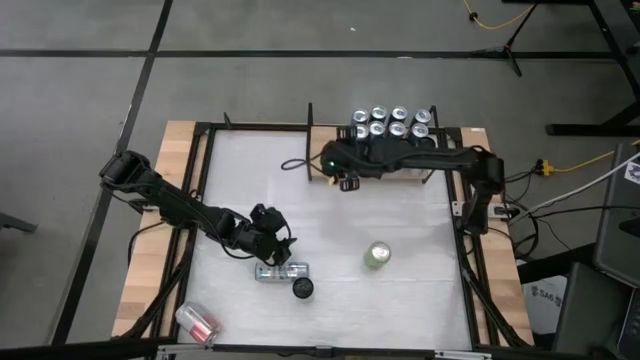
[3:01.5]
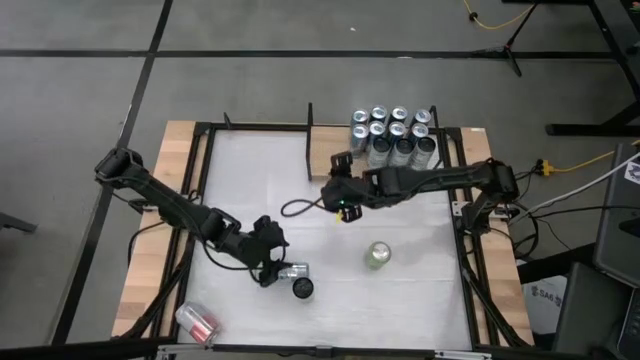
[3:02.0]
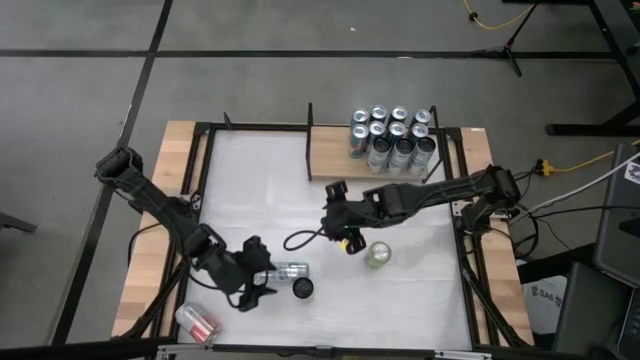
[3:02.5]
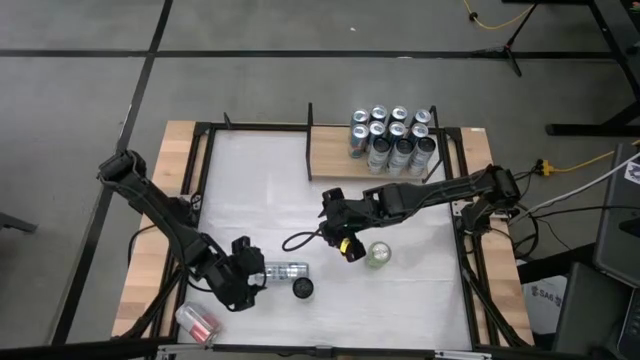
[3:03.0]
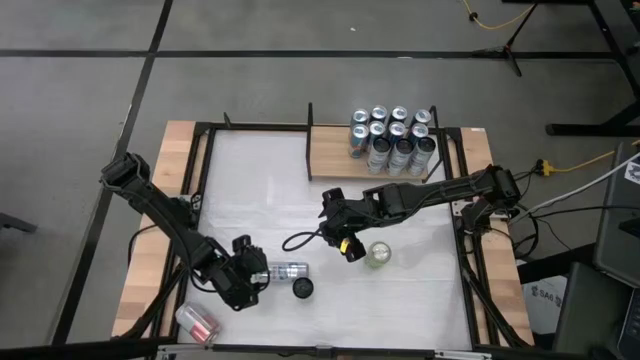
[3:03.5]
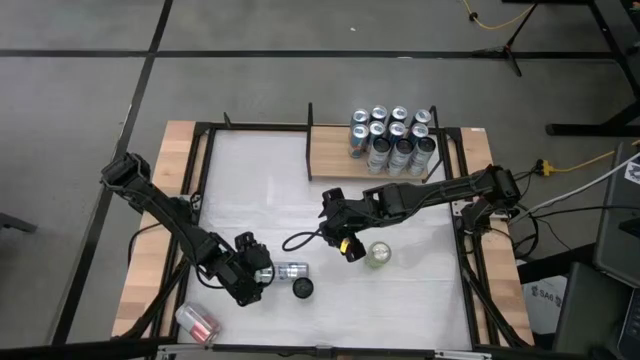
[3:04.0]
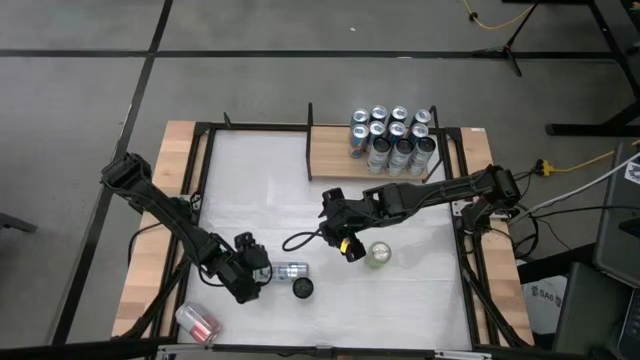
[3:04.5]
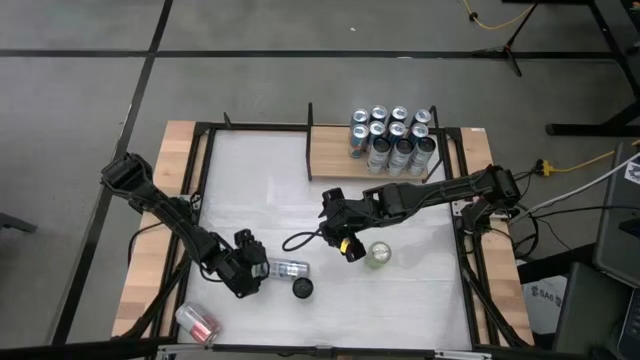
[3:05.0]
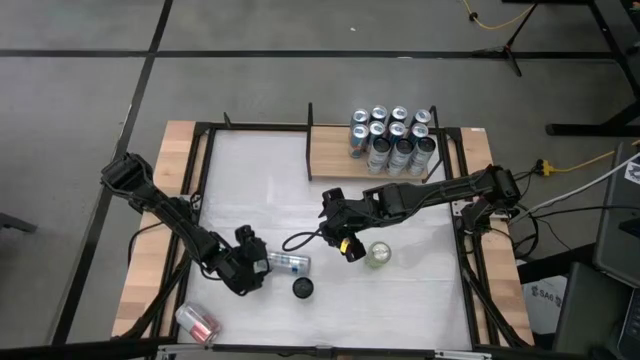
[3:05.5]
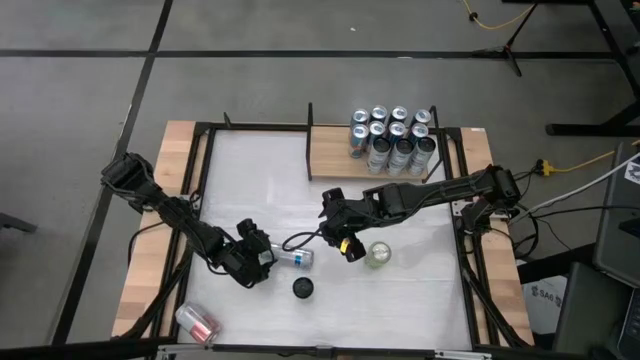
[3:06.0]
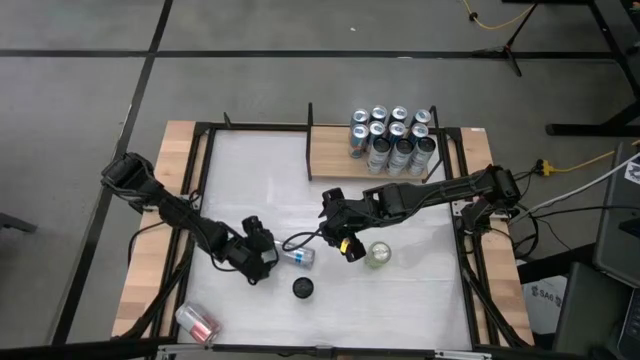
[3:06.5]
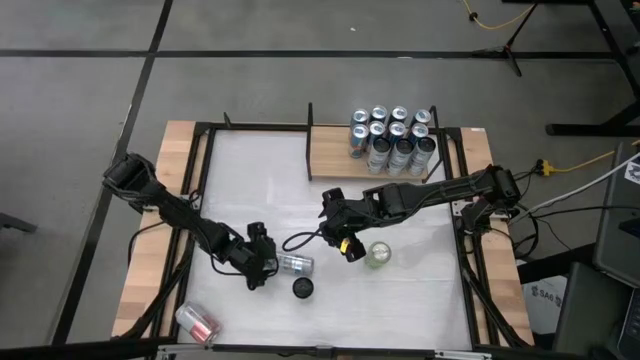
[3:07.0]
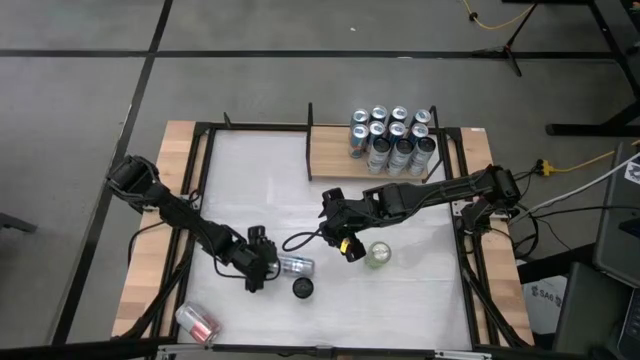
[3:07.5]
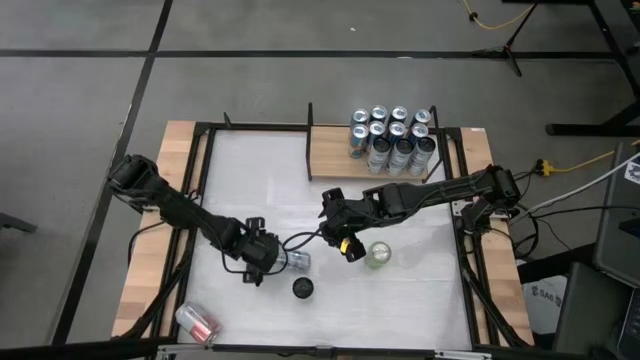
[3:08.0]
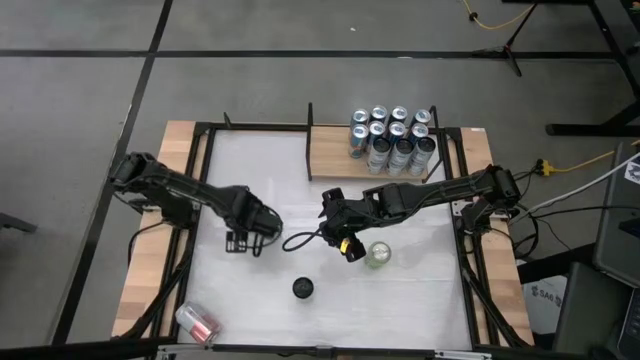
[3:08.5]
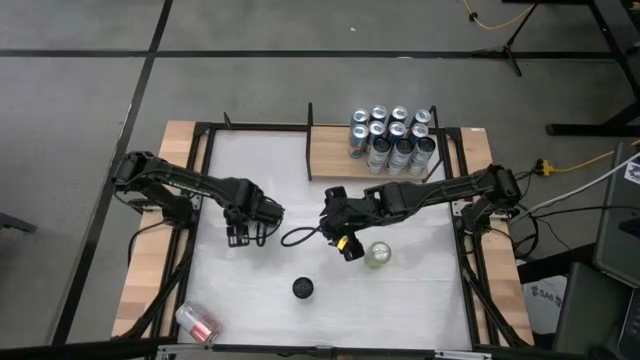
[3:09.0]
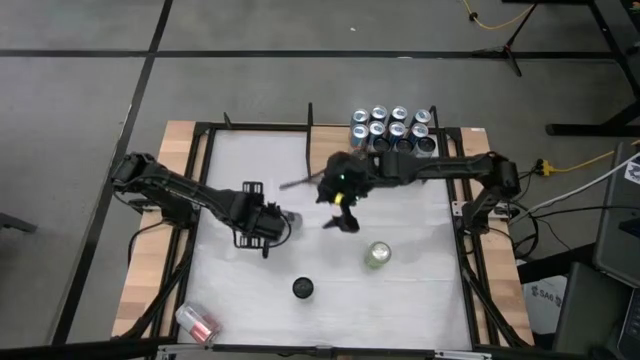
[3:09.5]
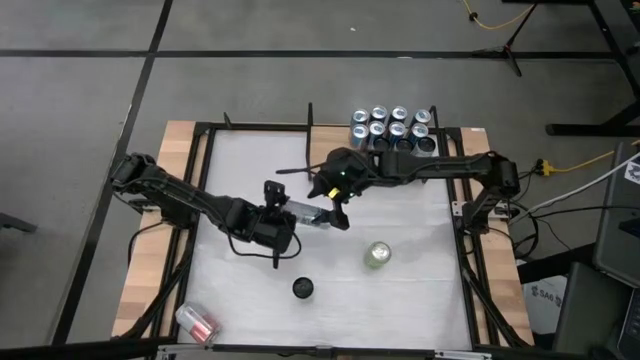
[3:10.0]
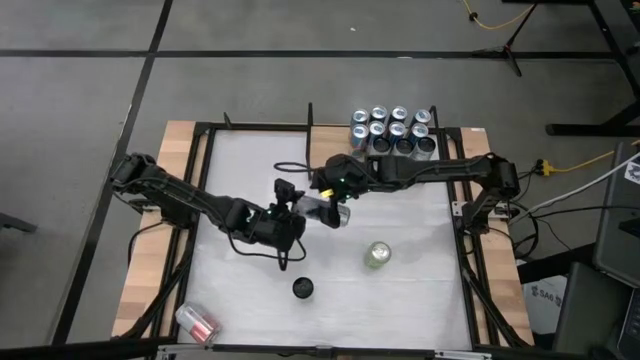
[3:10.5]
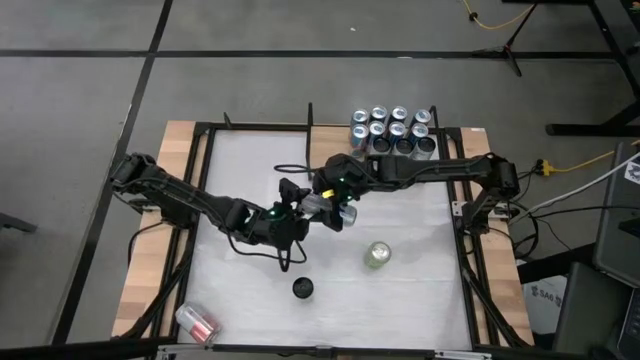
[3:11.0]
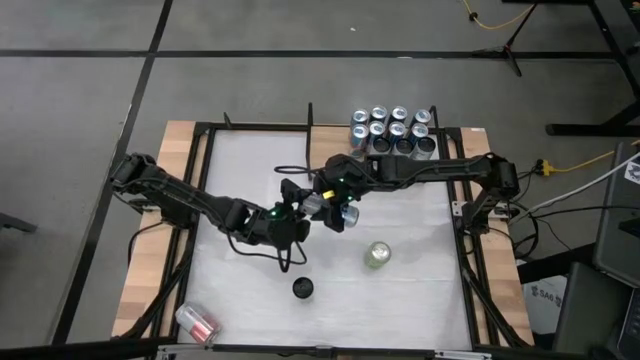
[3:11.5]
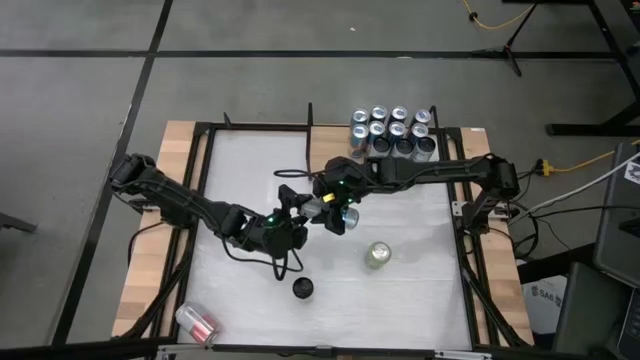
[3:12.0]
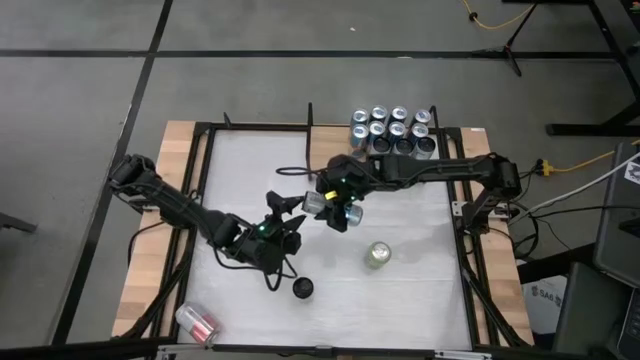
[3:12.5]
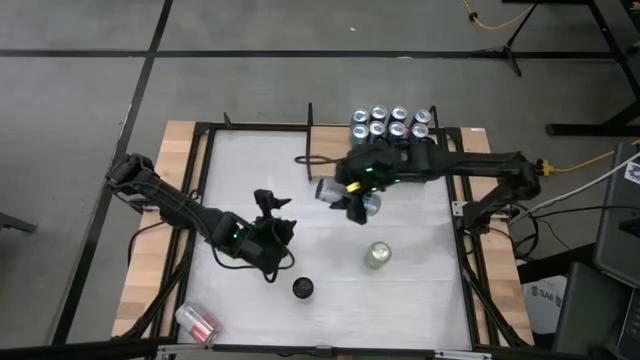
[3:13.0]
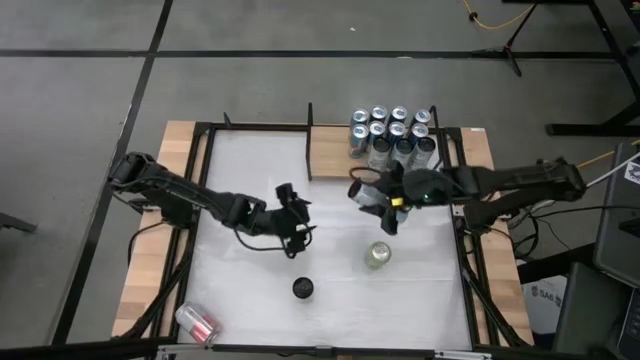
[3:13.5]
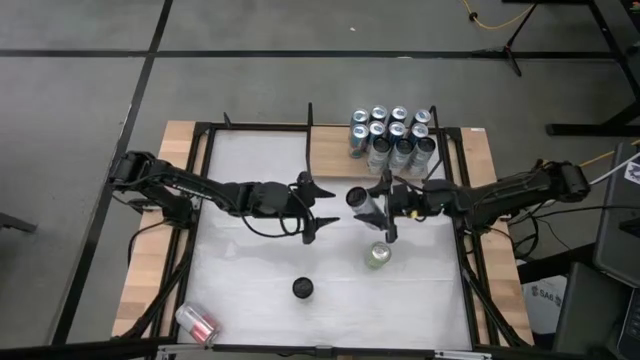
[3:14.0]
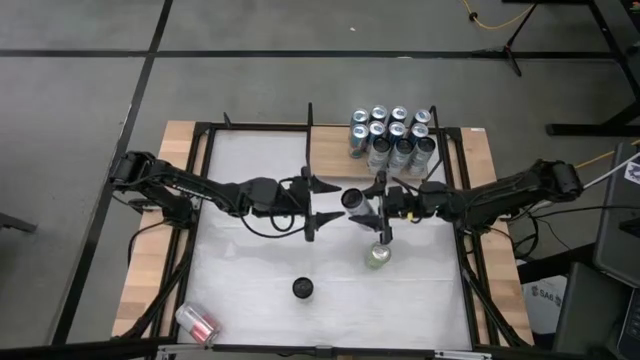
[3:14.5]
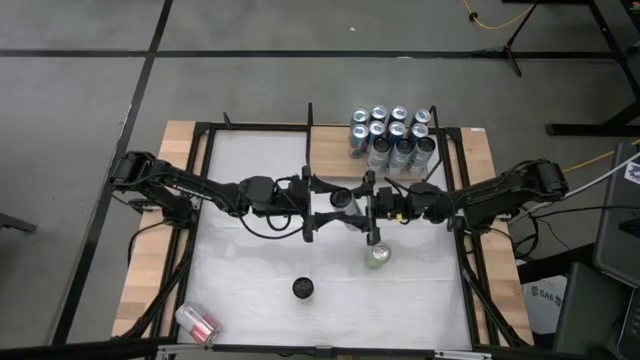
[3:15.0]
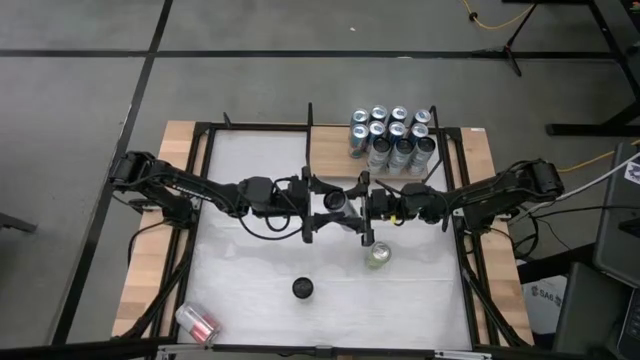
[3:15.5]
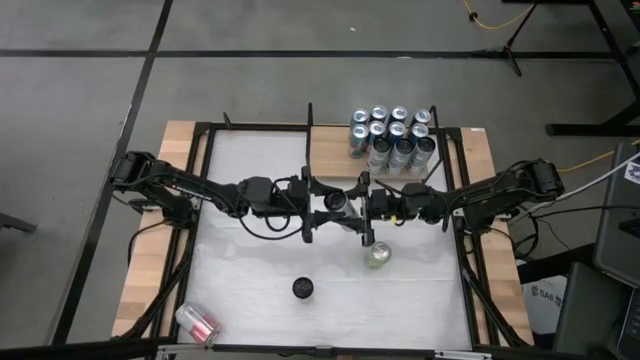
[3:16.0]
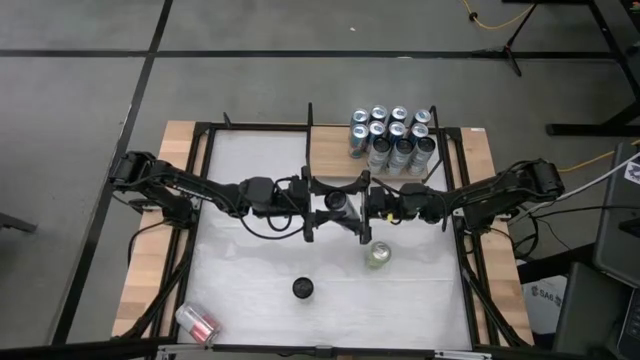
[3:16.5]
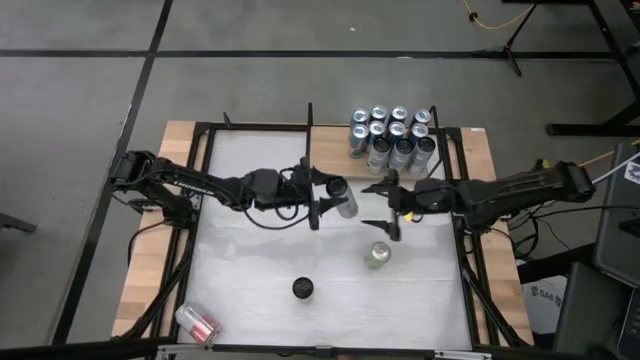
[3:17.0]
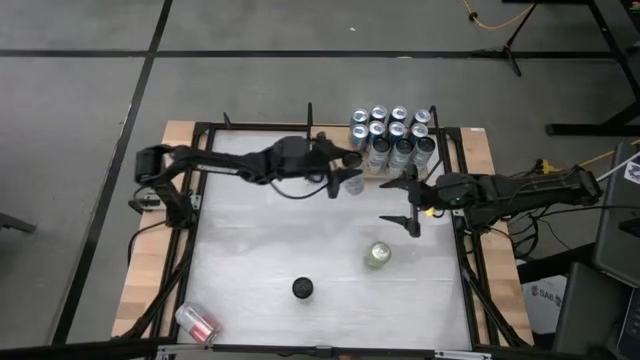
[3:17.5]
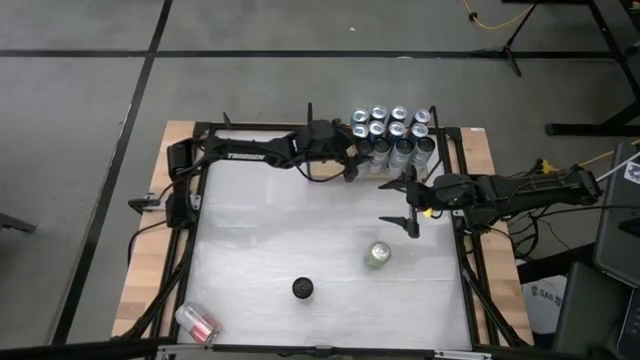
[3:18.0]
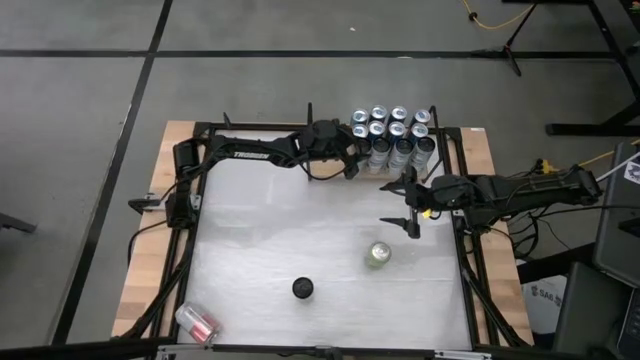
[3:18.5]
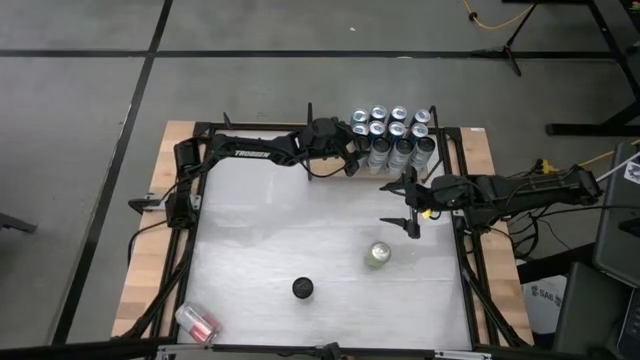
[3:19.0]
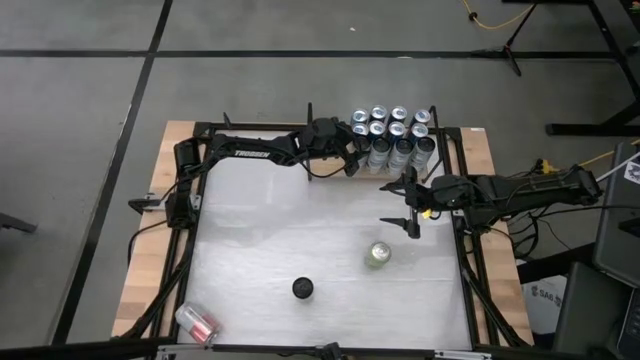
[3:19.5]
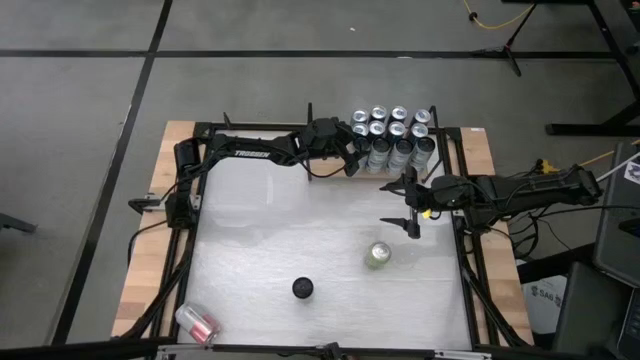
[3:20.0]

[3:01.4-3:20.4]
Task: Place canned beverage on shelf
Put the white-blue soda can on the shelf aligned with the other white-blue soda cans

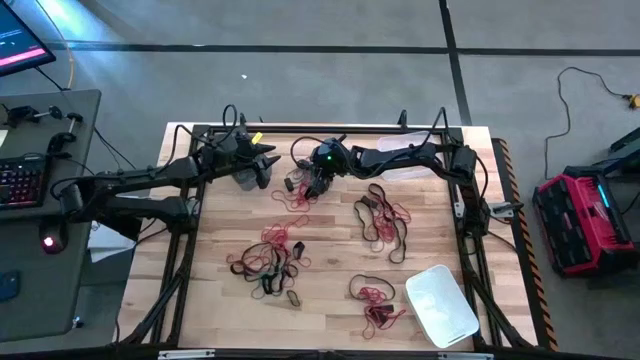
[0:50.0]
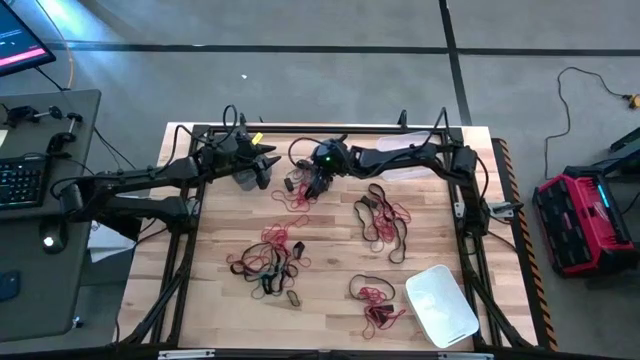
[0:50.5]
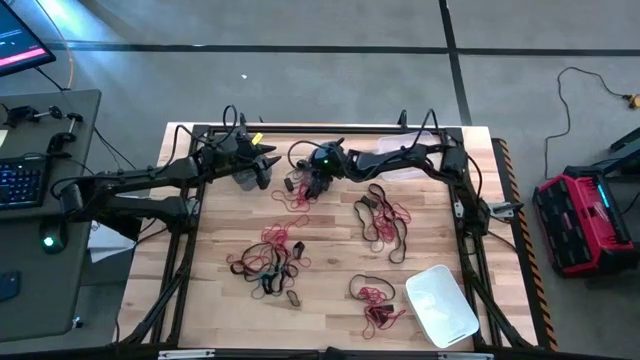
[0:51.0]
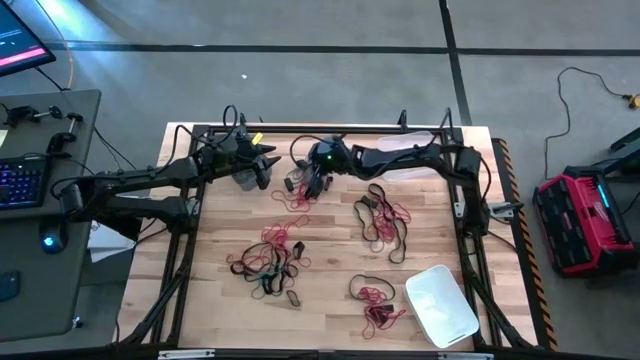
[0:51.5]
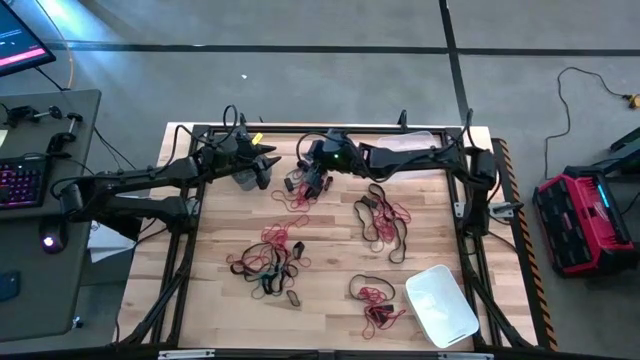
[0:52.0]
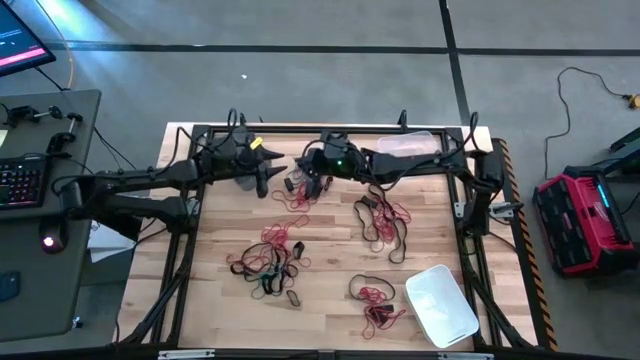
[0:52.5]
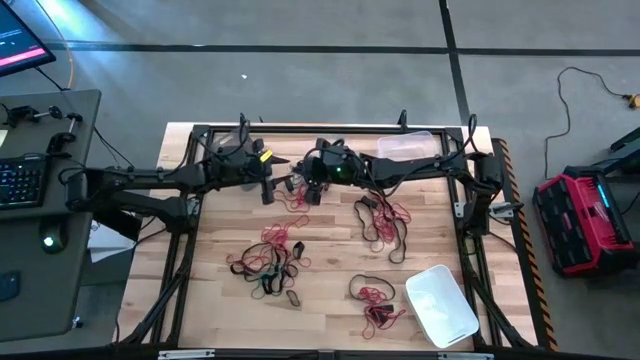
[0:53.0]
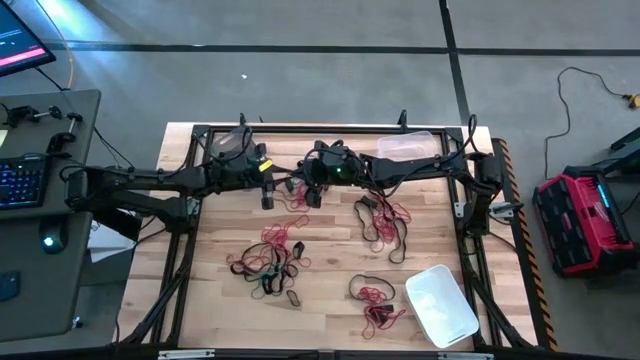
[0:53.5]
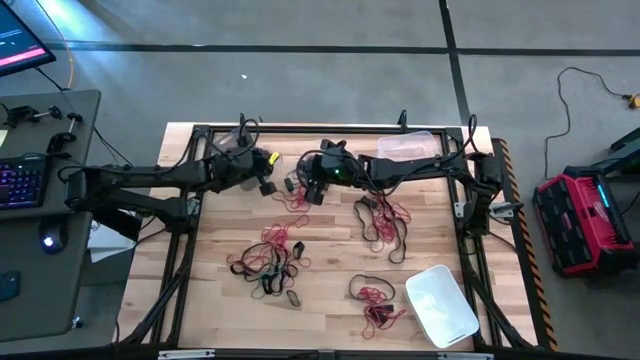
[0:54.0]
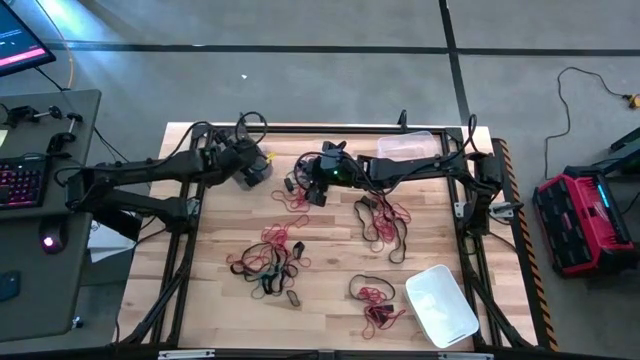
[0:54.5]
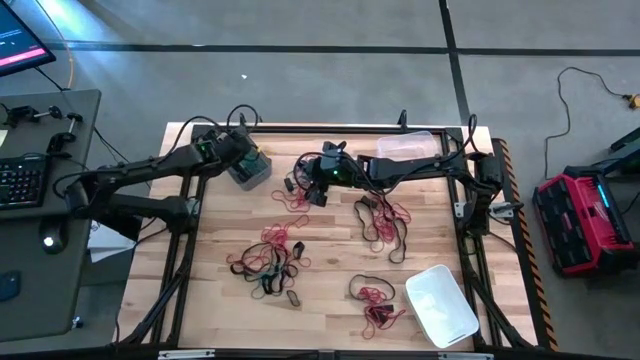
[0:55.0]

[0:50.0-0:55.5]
Task: Sort rubber bands into baskets
Put the blue rubber band into the black bin
